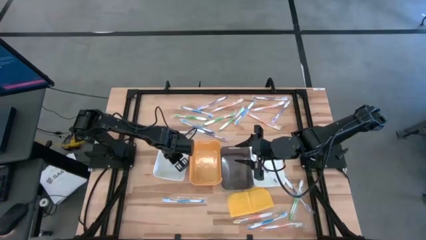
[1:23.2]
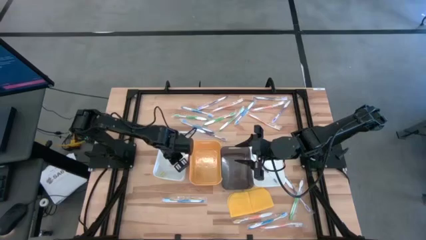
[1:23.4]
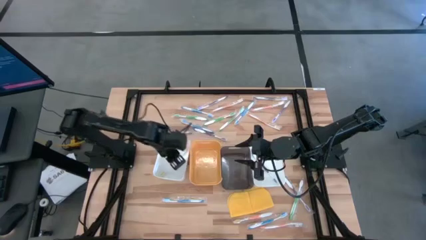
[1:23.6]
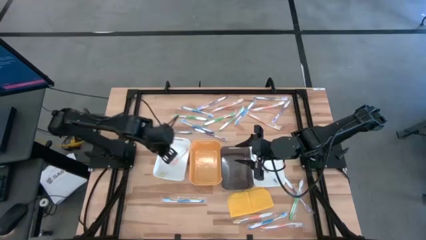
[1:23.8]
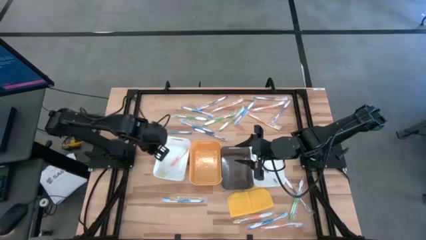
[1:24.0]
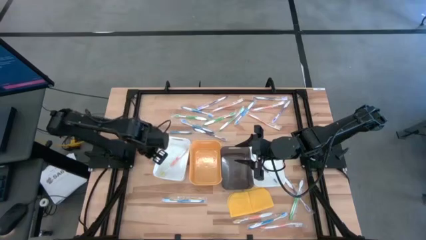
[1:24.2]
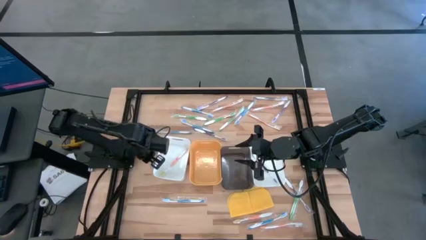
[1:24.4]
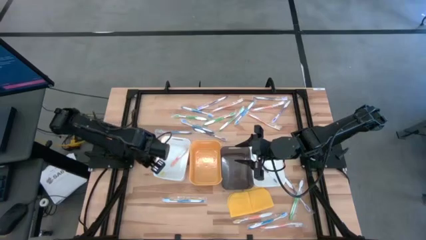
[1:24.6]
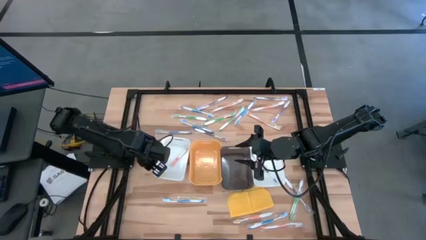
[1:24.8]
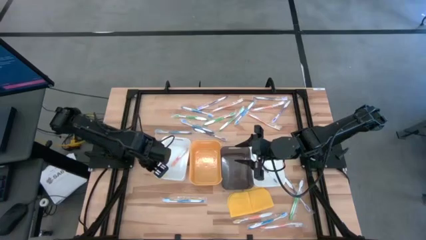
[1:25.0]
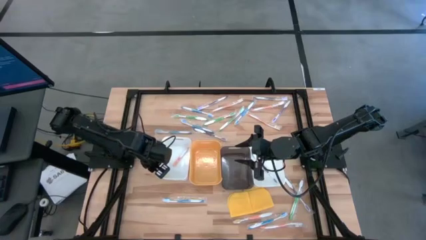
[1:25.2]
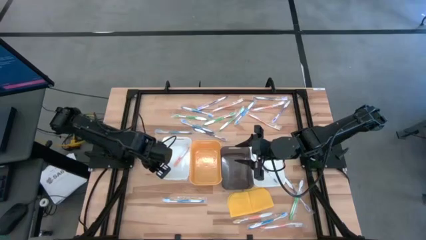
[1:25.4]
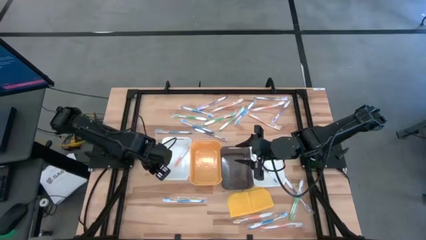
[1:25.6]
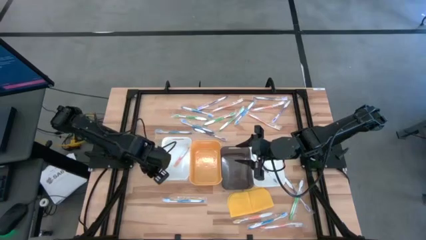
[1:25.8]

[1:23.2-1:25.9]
Task: Pick & Place Toothbrushes
Adjust the left white bin

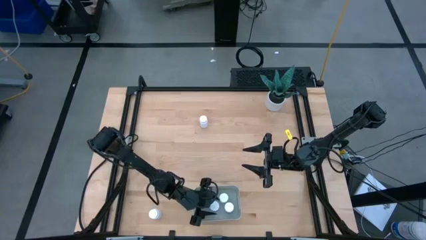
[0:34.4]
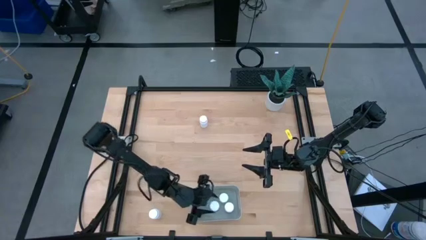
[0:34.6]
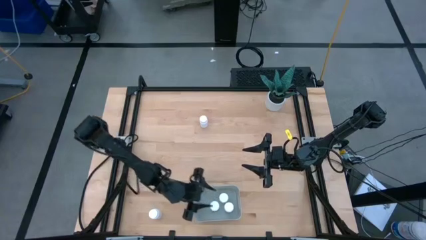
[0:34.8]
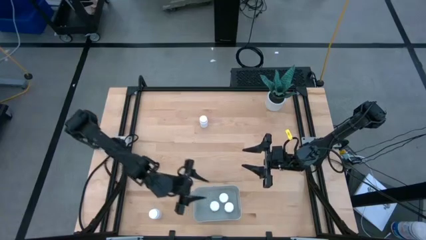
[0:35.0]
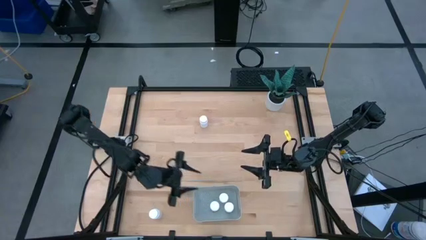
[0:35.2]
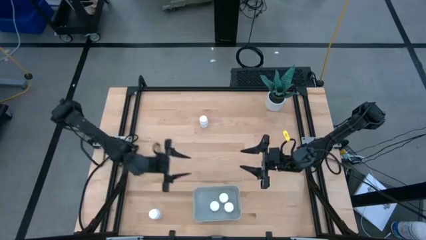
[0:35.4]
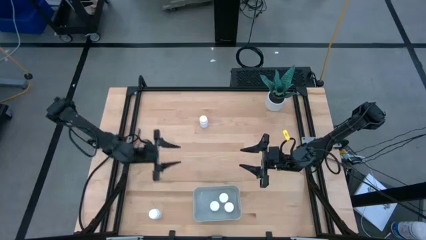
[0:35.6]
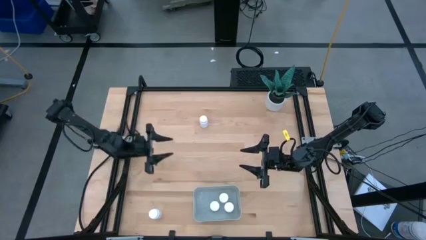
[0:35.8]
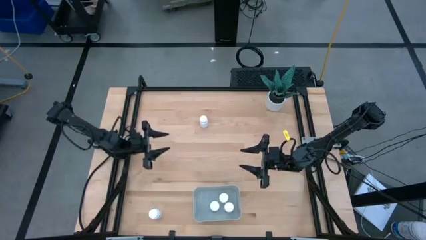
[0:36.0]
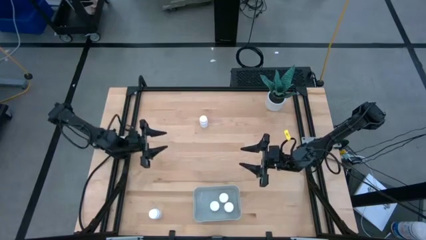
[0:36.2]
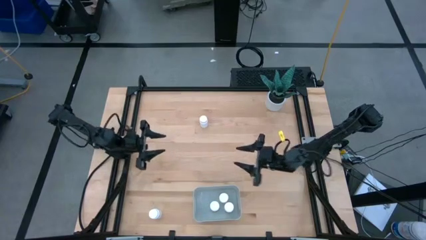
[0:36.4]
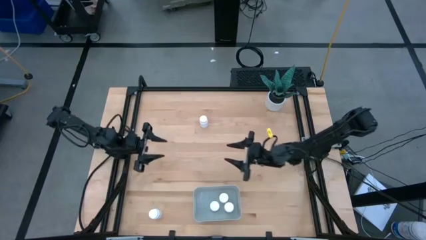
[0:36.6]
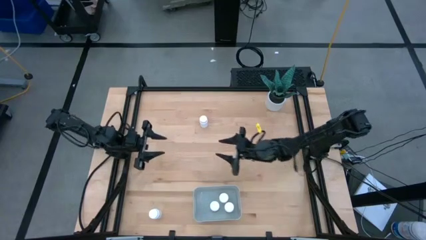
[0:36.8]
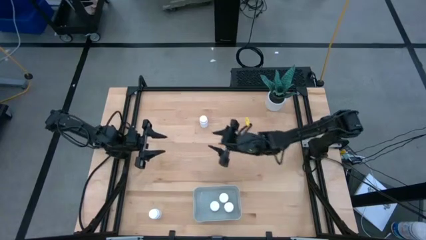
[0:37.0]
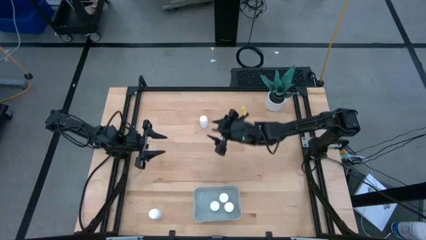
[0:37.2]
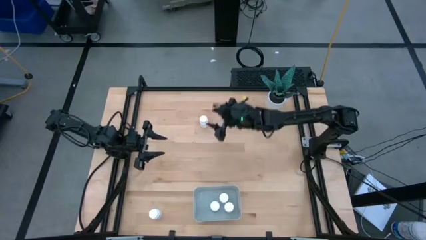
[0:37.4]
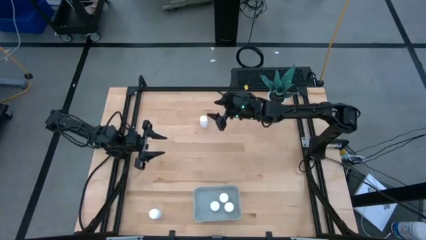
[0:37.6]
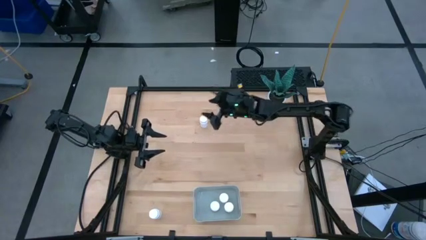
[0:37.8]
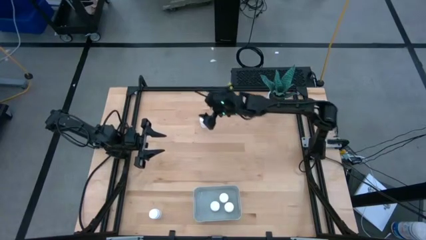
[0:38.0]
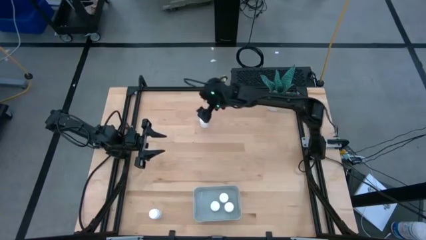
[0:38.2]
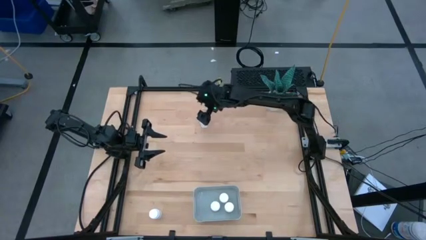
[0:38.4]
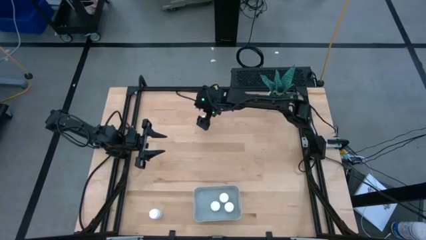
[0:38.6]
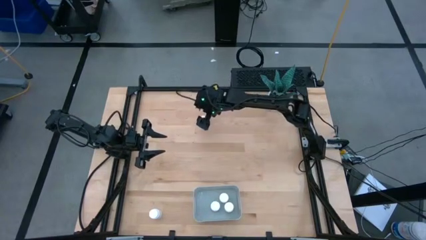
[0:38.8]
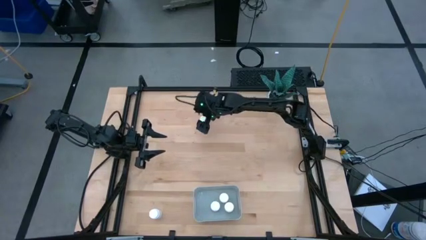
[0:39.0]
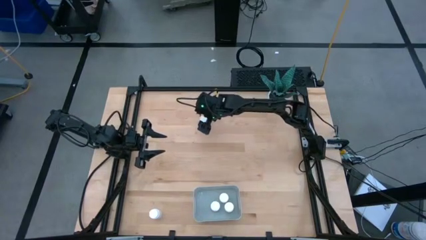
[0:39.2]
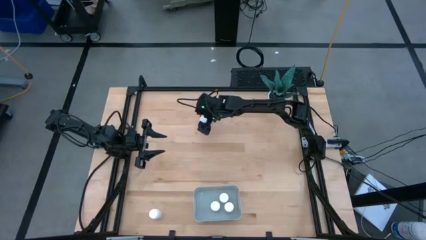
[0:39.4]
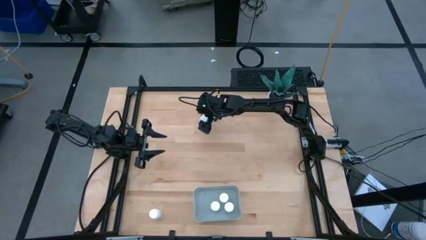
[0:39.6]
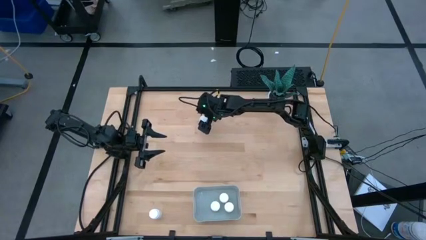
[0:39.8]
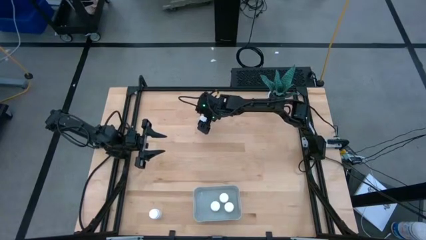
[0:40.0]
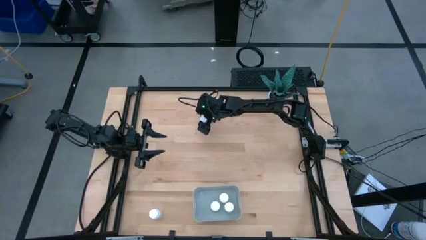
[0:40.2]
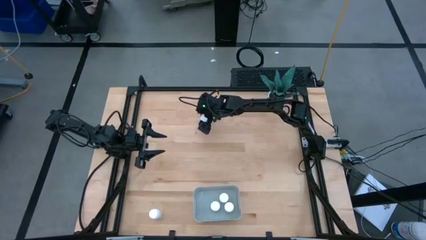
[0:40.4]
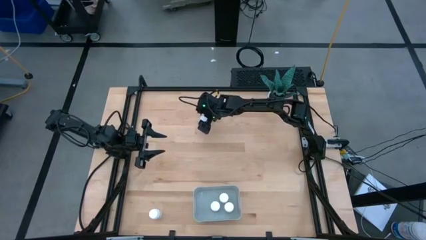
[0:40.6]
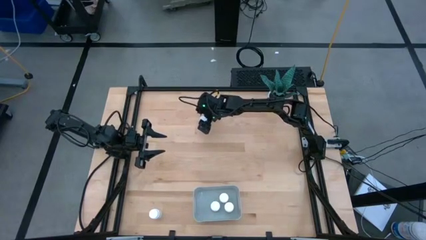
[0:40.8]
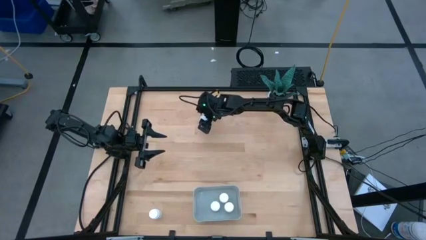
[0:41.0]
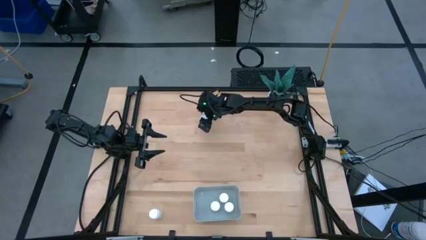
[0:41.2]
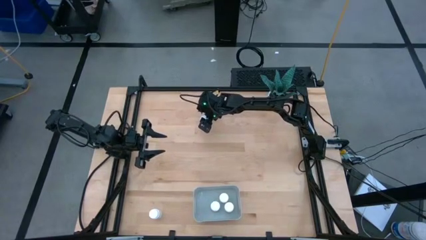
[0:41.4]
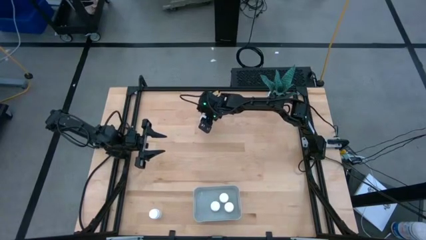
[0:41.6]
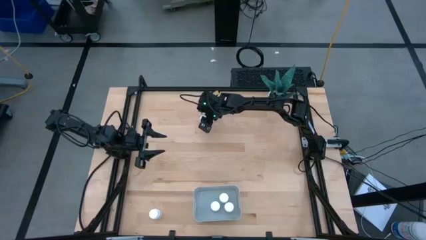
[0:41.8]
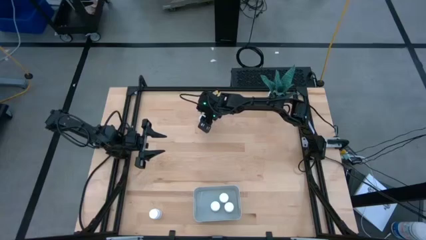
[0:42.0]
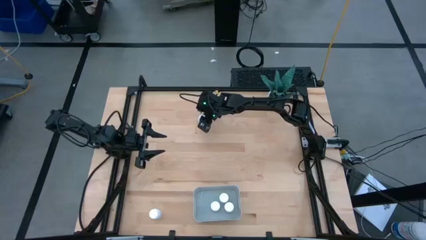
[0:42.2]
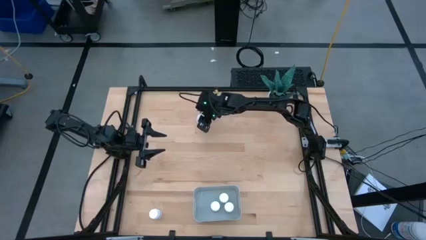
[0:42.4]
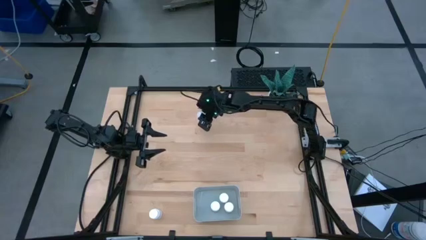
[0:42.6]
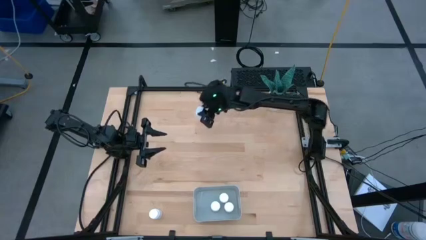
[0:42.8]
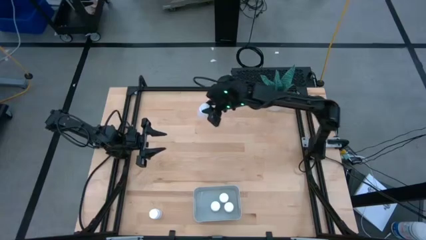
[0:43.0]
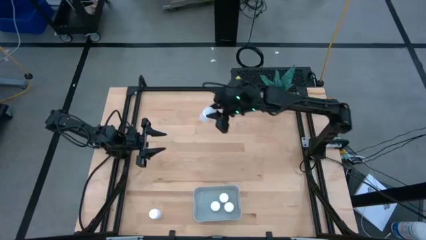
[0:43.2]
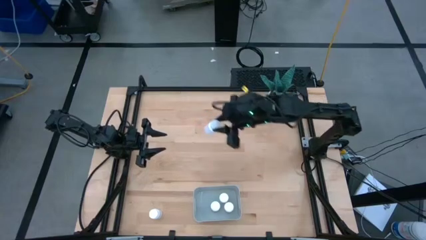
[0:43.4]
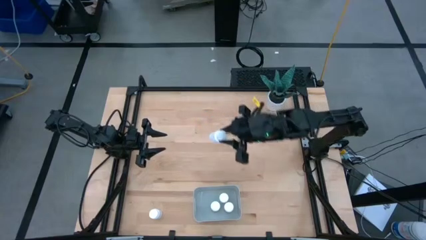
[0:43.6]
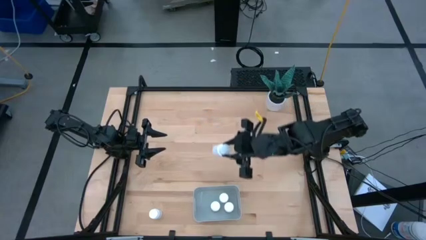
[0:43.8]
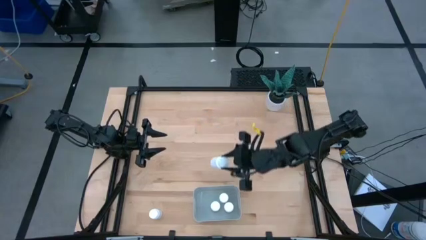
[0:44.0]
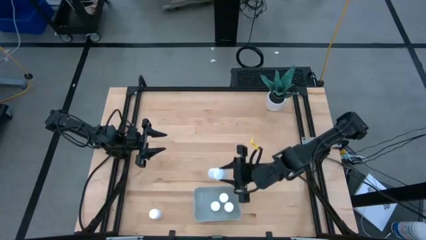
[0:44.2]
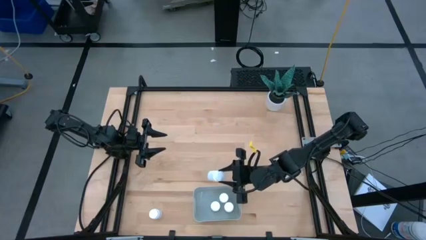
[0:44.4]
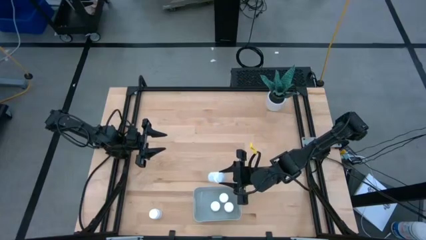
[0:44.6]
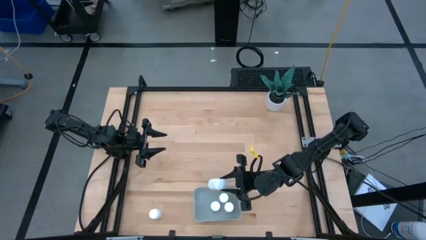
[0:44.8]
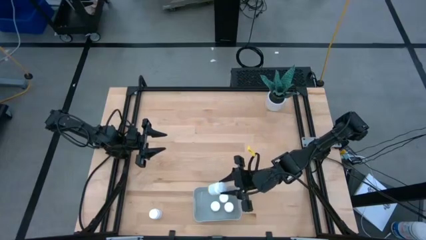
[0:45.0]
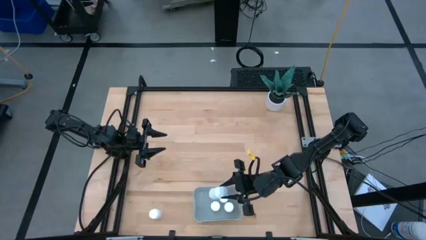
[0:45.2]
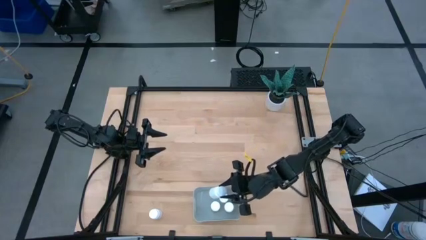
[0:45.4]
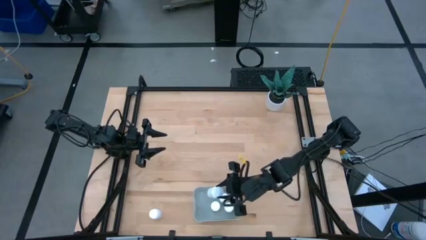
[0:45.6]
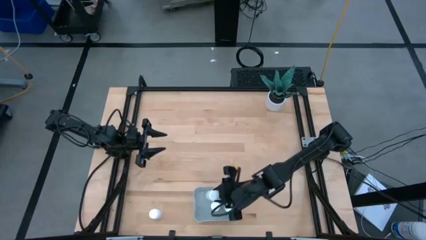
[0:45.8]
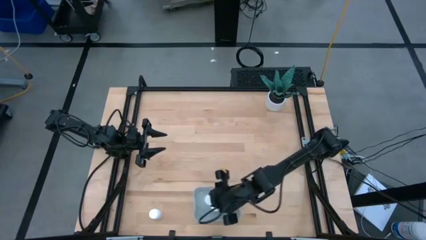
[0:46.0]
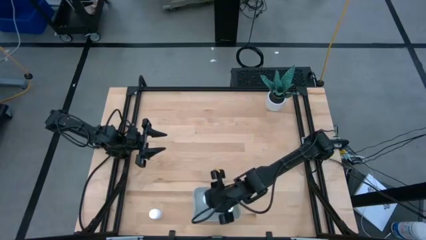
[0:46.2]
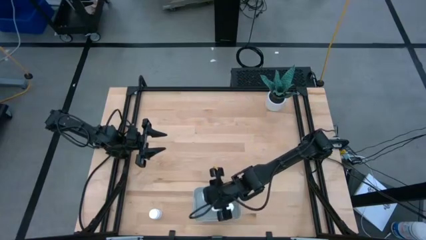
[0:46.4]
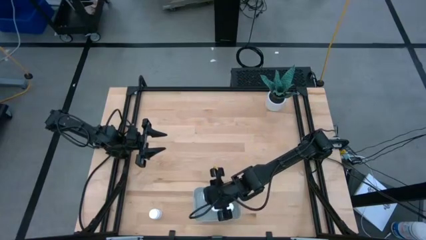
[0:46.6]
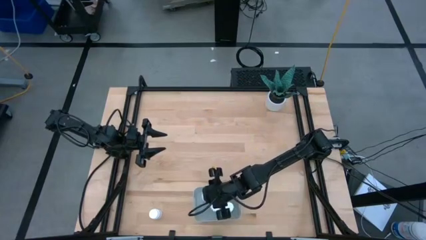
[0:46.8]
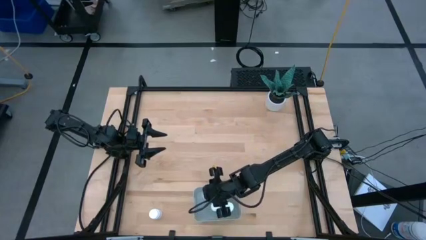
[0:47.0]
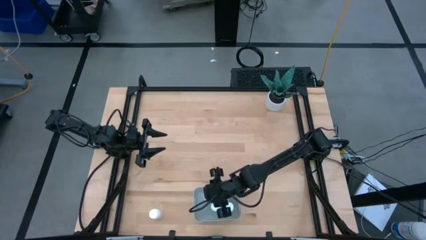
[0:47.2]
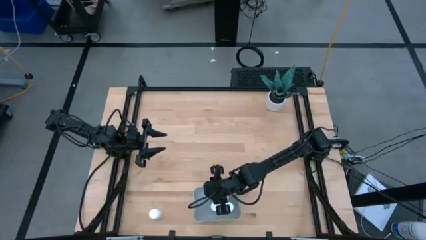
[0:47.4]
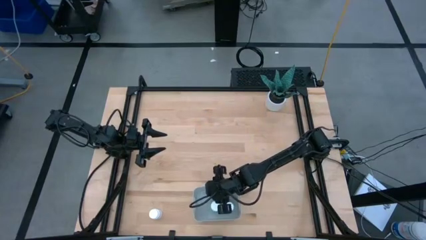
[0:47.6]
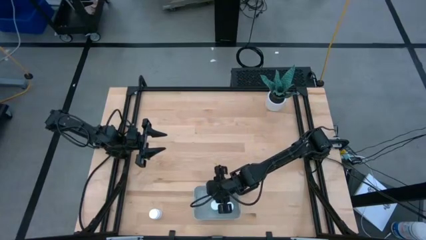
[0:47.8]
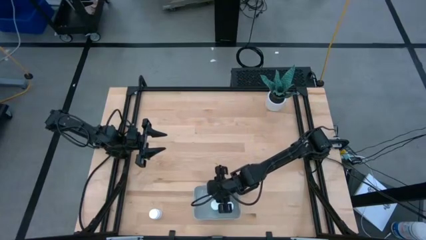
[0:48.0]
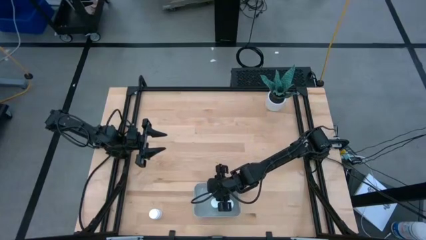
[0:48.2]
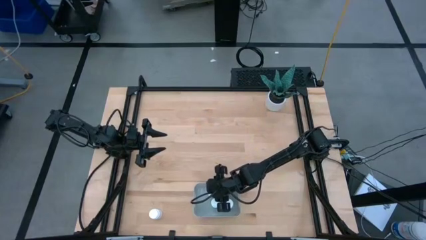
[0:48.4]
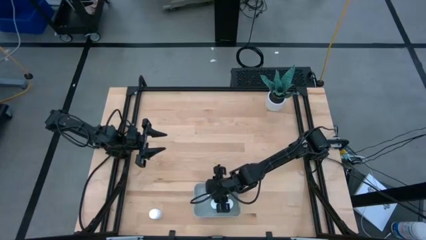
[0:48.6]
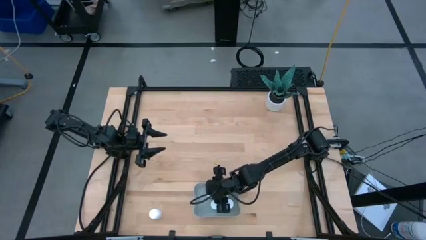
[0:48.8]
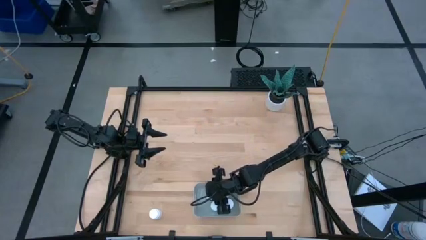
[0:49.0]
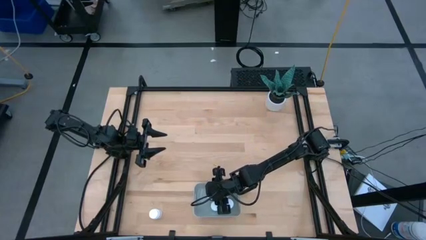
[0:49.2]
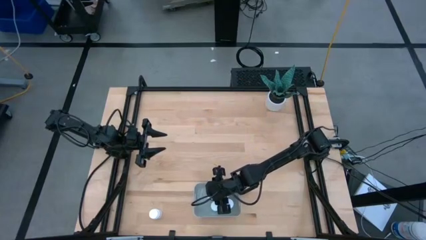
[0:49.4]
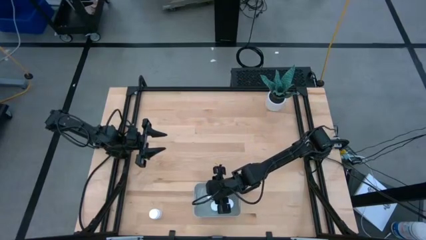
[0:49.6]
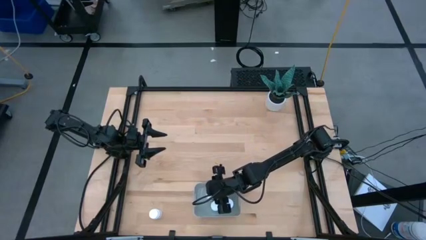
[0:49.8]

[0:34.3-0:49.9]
Task: Pick and place pill bottles into a basket
Put the white pill bottle into the gray bin
